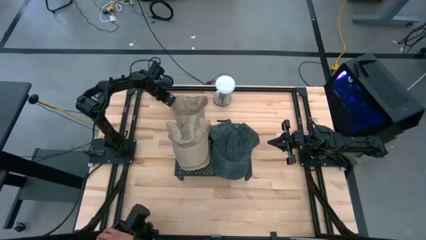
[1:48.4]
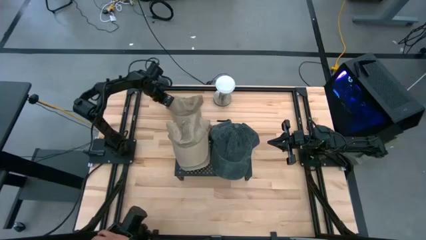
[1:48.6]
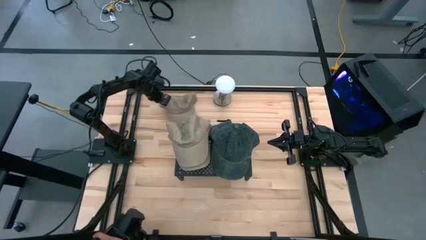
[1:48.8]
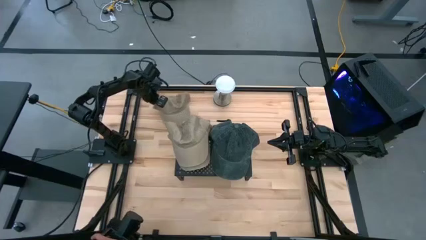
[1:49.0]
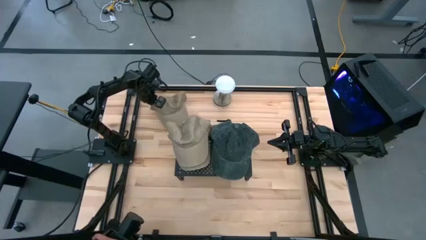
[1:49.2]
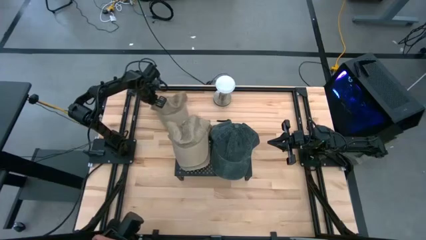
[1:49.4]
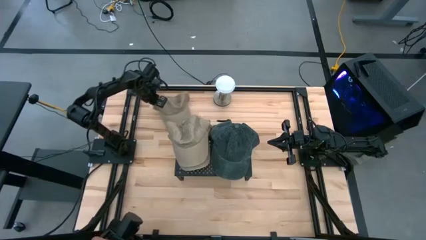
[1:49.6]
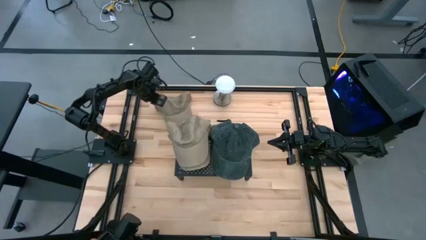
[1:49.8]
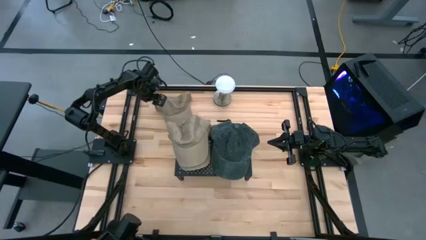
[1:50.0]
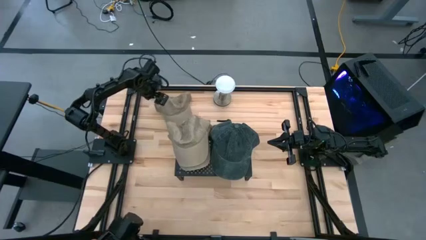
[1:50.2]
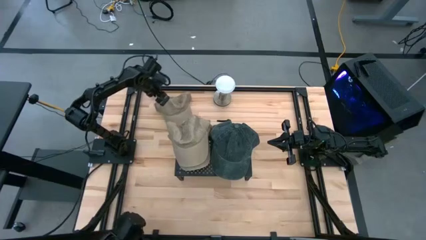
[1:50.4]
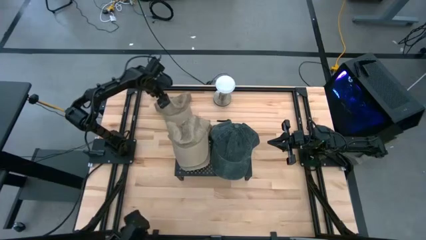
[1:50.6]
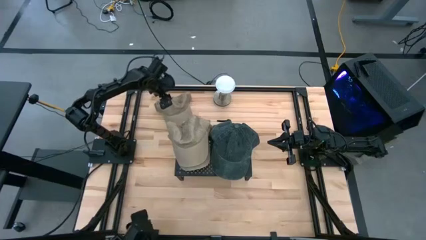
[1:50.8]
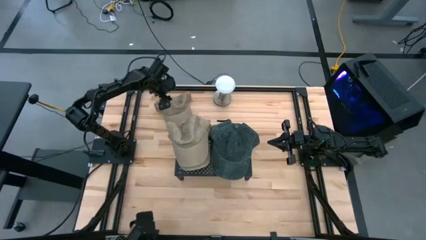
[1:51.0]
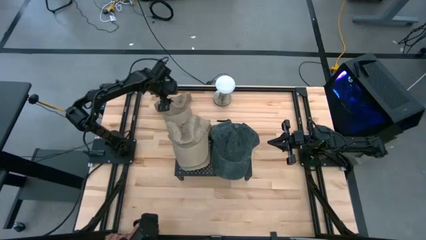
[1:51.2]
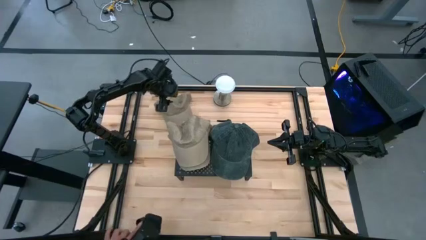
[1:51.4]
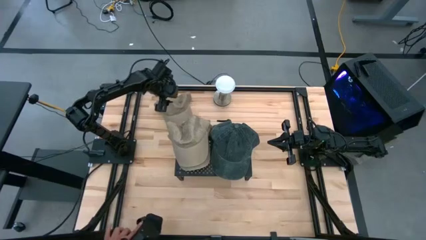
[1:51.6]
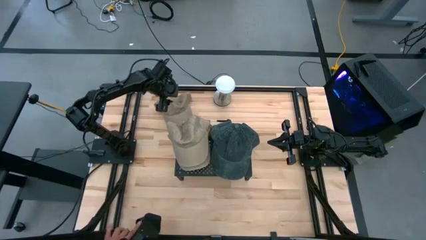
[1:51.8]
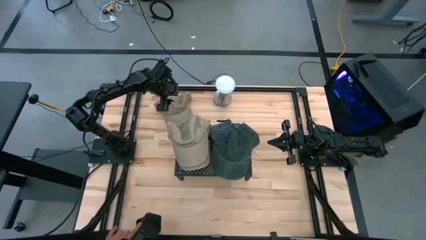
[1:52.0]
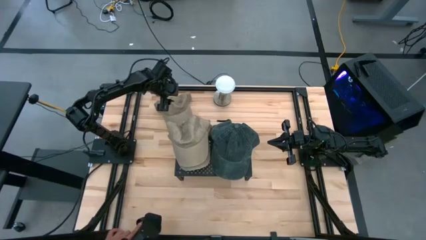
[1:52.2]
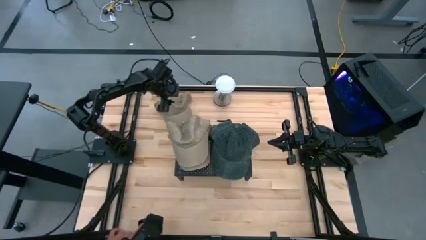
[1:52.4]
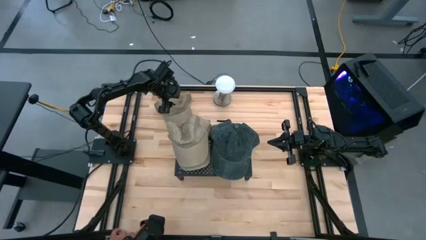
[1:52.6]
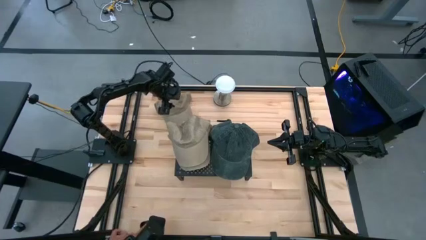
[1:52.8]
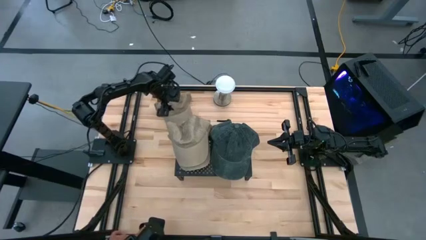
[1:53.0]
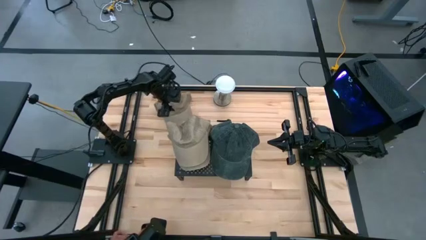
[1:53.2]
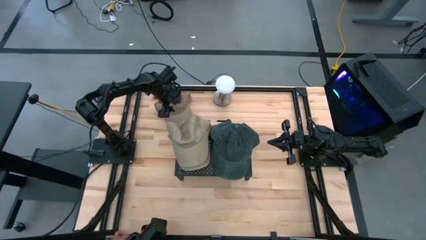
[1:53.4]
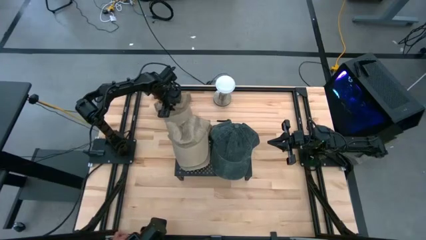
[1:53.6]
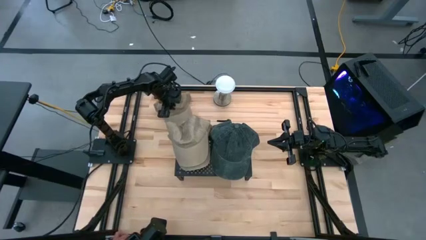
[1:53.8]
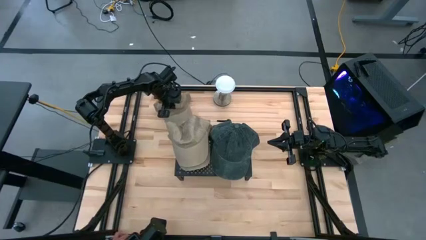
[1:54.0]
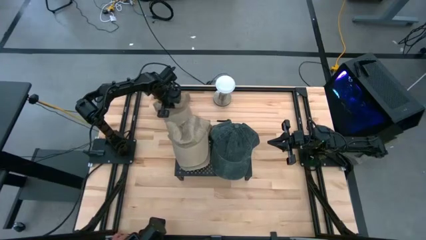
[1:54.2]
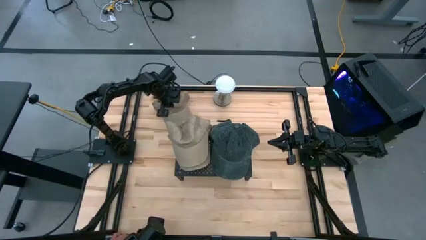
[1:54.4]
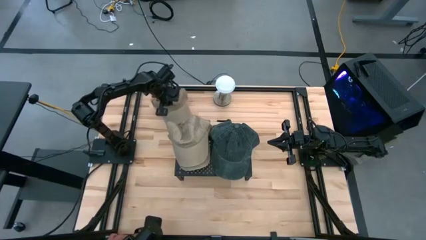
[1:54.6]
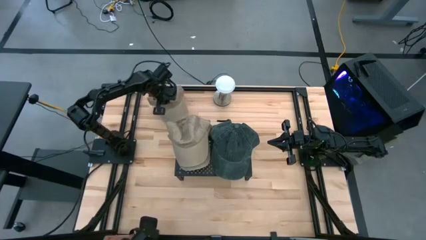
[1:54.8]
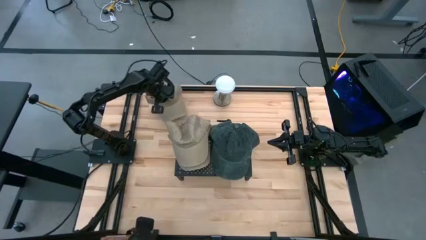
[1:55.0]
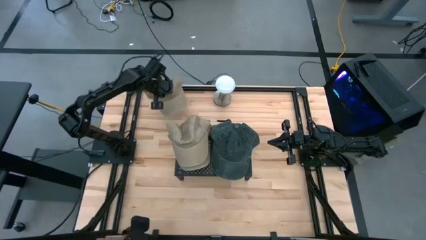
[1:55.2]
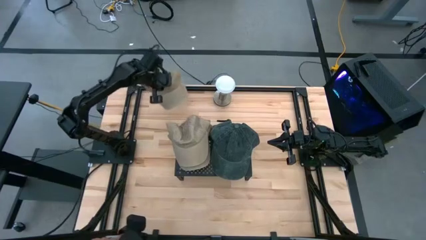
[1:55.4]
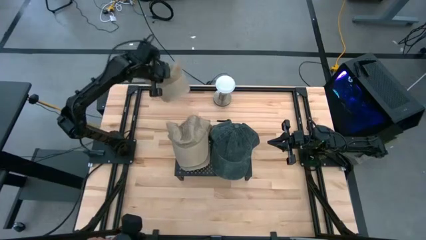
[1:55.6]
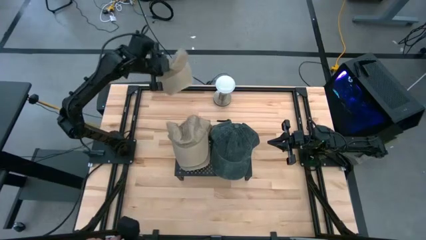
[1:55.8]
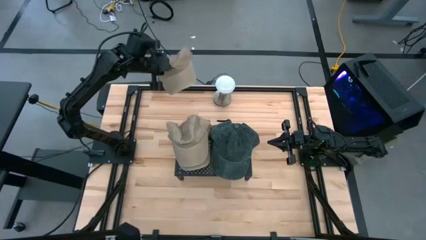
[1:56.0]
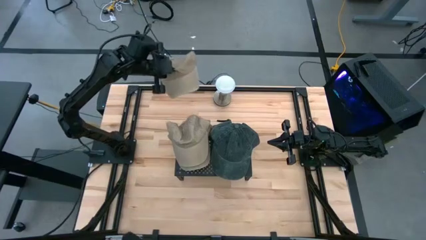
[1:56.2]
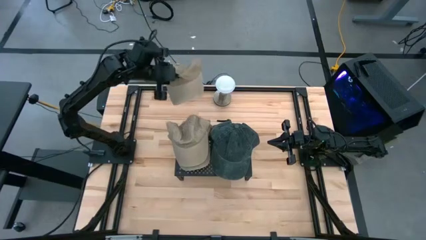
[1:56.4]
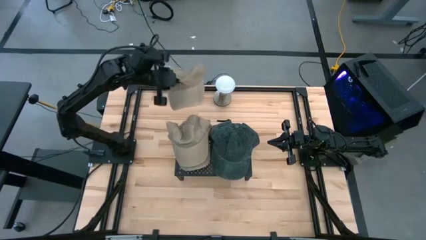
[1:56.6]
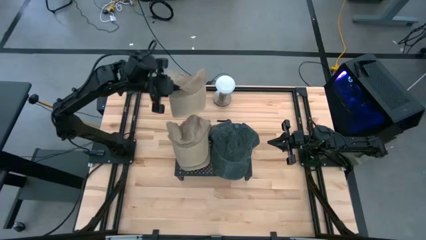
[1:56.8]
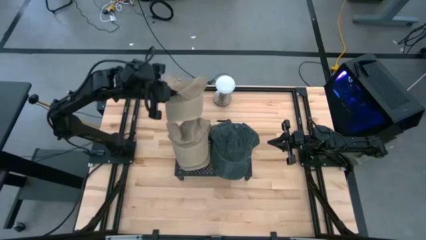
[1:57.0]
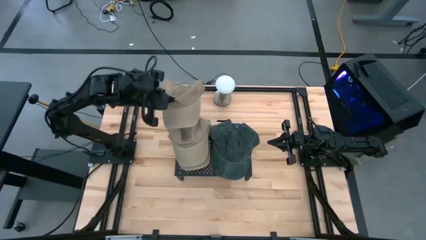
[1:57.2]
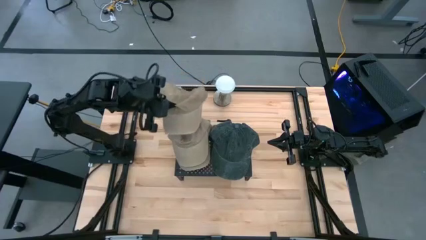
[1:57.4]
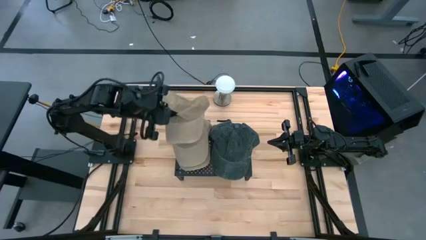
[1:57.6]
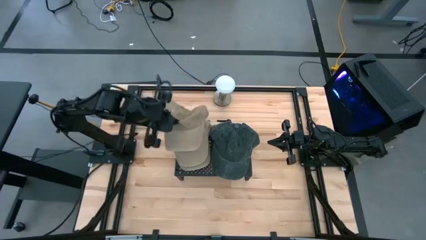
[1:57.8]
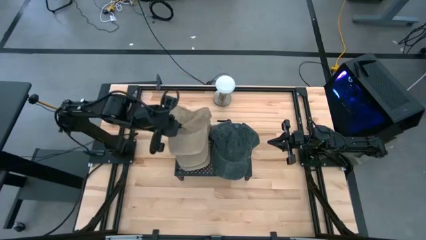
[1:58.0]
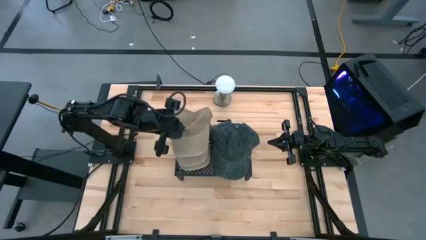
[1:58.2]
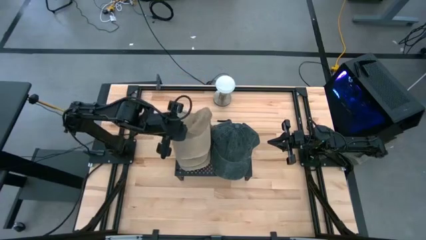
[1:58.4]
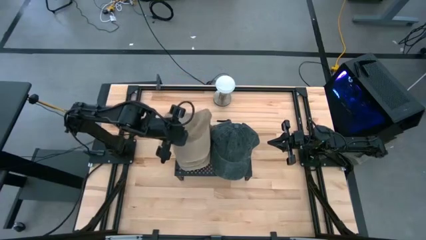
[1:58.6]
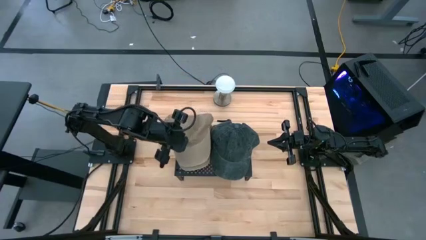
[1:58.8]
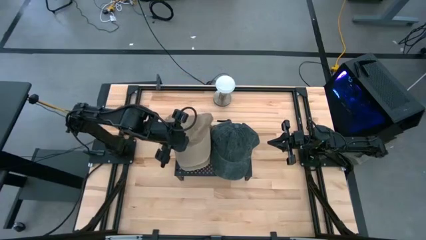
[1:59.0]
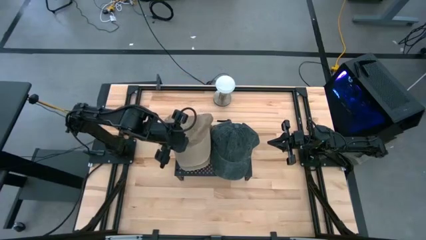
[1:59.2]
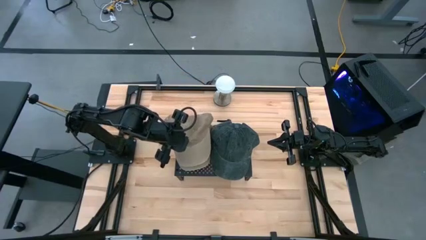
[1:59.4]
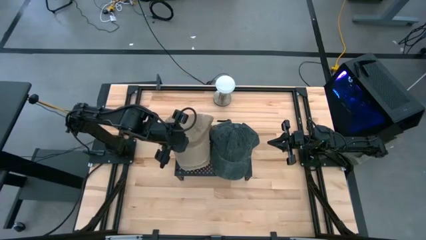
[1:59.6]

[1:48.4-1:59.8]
Task: Pick & Place hat
Stack the brown cap into the stack of brown caps on the shelf

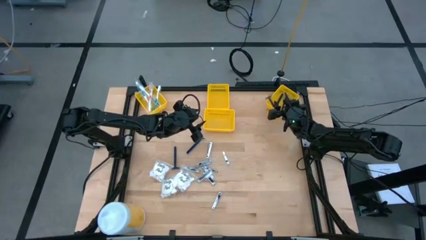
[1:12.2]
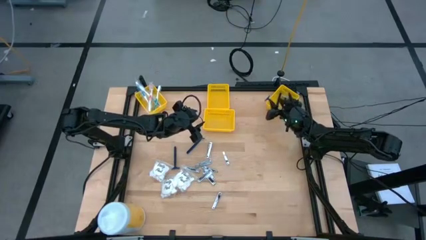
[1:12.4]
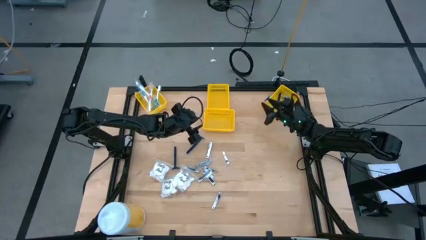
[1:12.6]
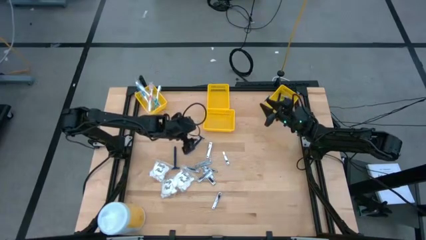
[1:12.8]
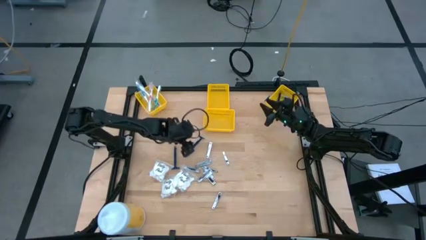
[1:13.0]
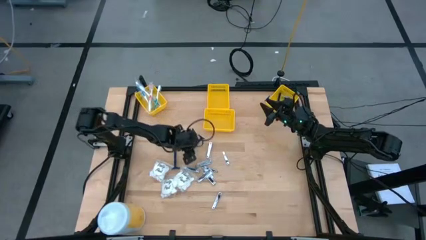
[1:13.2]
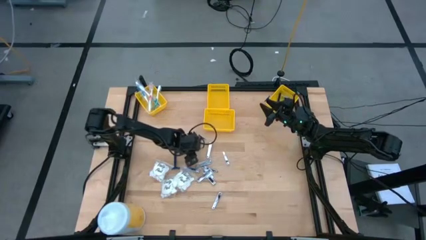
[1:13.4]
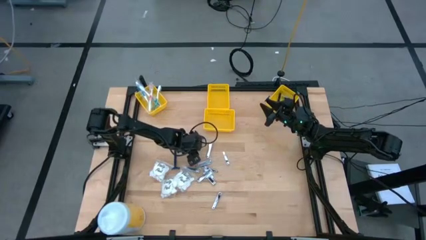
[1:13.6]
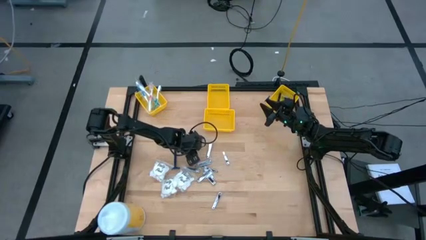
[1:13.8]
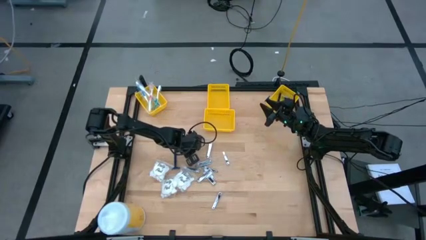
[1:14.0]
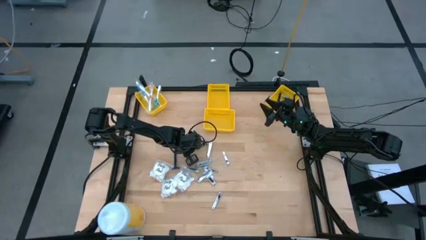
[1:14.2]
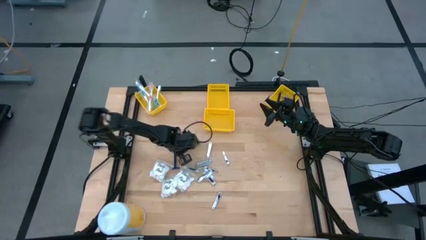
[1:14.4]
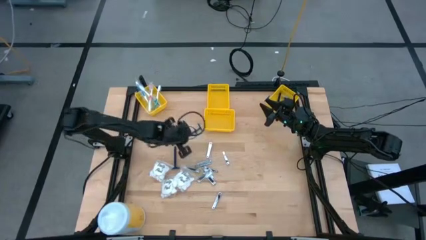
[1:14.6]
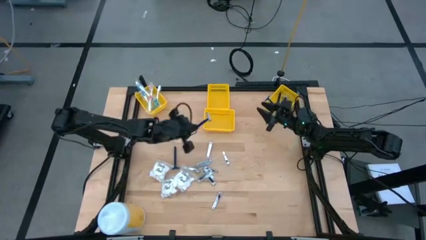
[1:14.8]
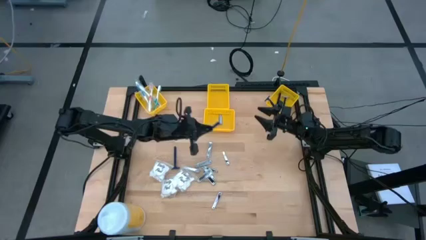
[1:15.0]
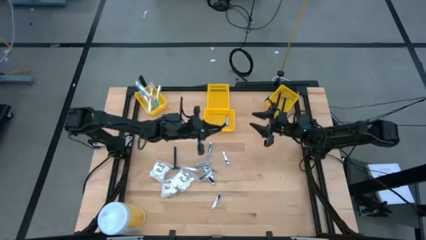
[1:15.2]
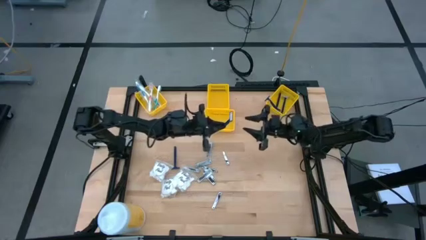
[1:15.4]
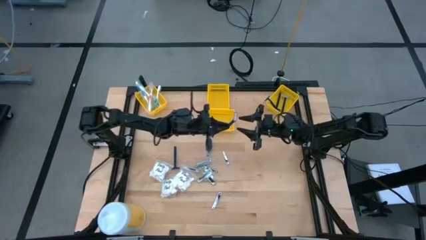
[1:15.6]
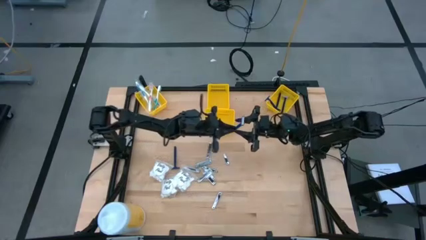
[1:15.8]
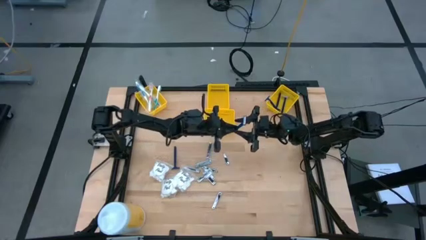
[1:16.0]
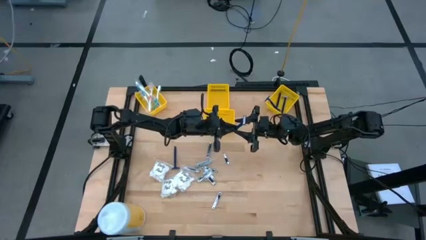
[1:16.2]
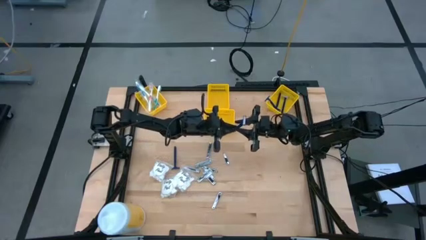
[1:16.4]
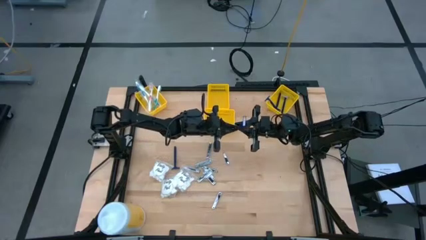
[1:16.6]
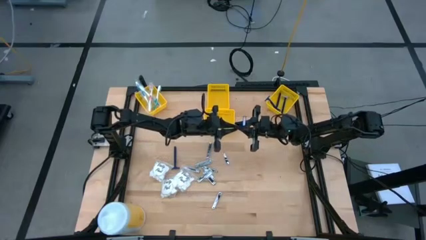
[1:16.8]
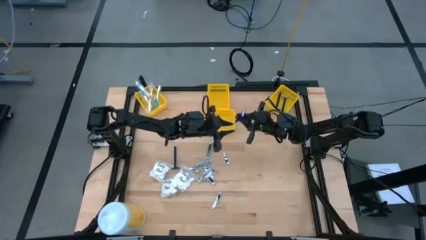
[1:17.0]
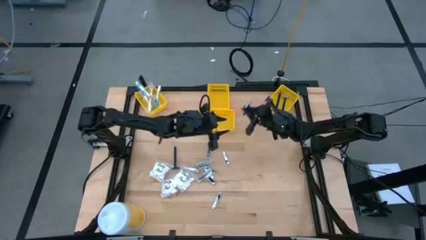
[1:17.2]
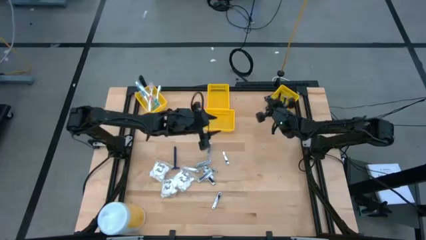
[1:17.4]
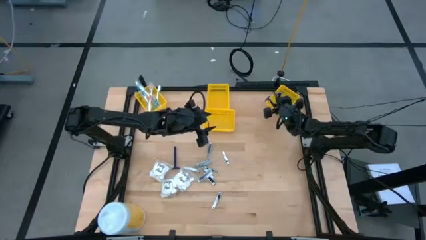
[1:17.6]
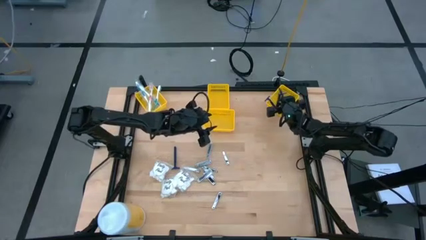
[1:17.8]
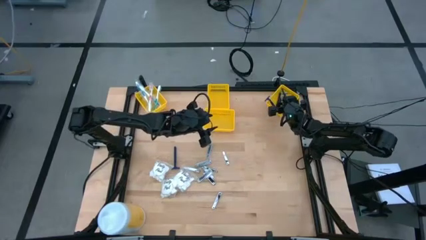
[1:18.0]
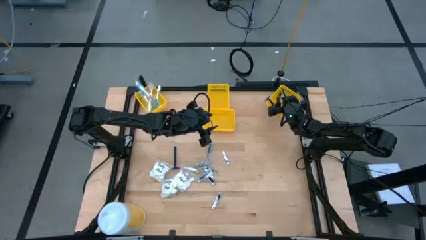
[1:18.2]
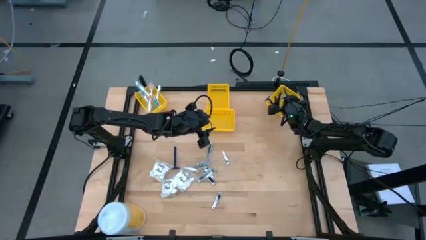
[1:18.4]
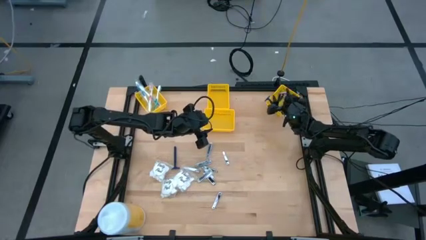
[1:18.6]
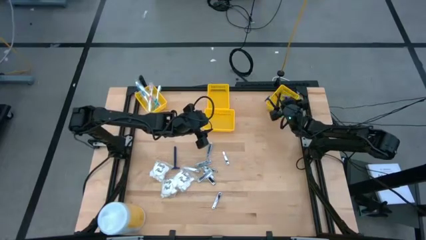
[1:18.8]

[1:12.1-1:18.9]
Task: Pick & Place Travel size toiletries
Put the blue razor into the right yellow bin
